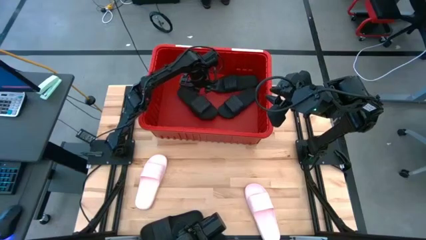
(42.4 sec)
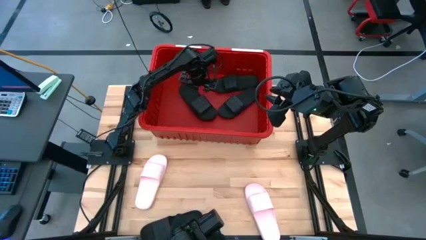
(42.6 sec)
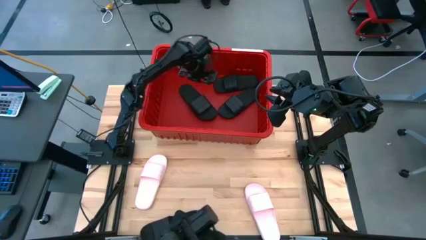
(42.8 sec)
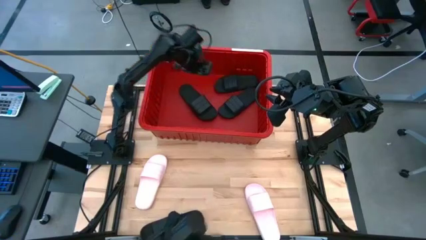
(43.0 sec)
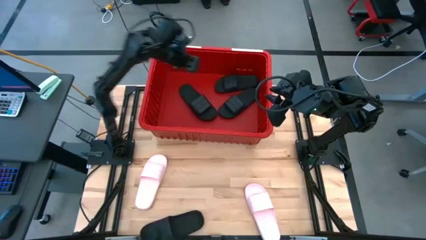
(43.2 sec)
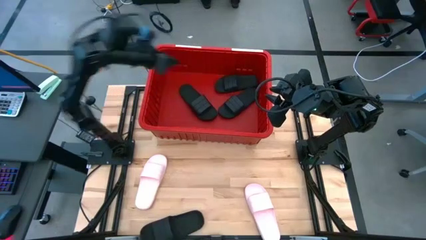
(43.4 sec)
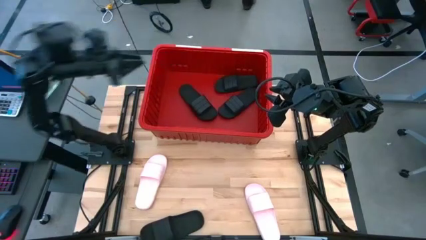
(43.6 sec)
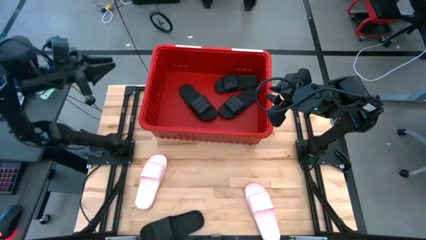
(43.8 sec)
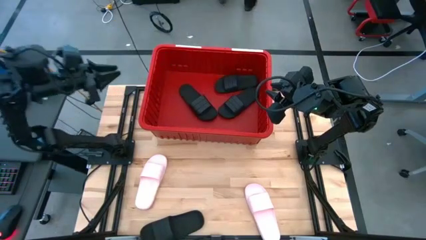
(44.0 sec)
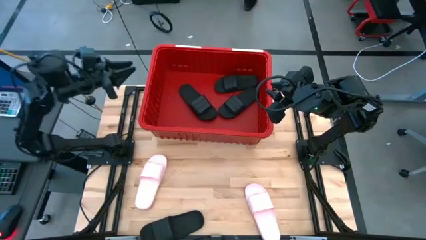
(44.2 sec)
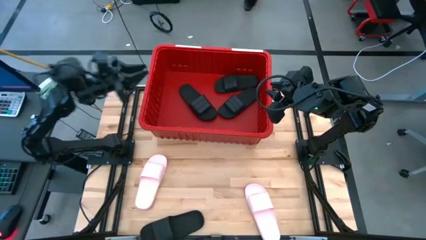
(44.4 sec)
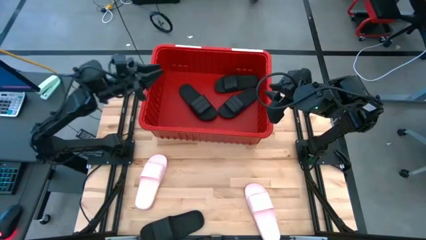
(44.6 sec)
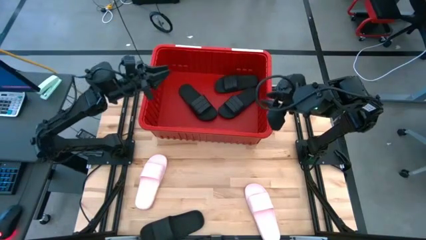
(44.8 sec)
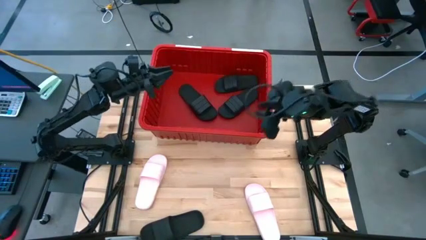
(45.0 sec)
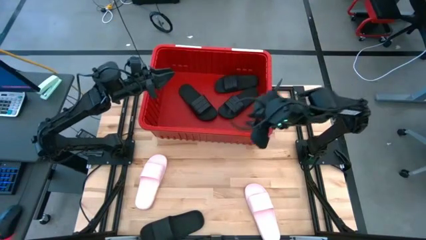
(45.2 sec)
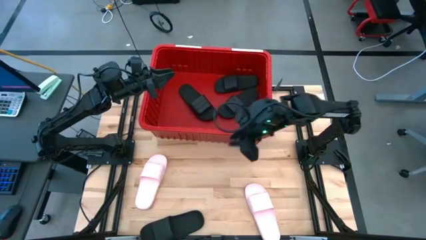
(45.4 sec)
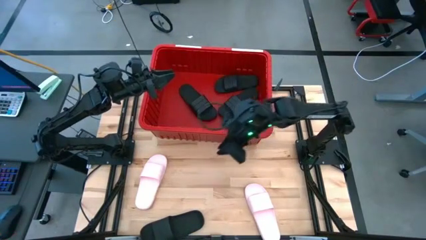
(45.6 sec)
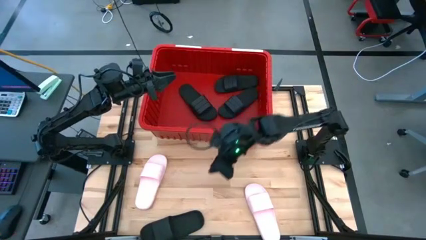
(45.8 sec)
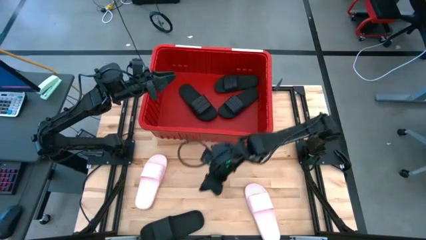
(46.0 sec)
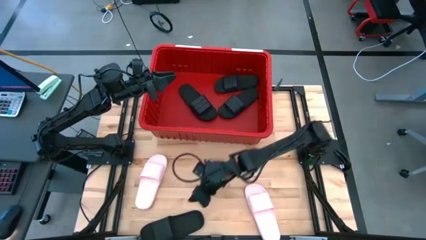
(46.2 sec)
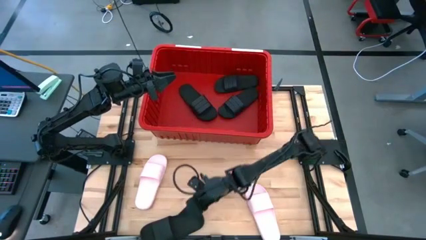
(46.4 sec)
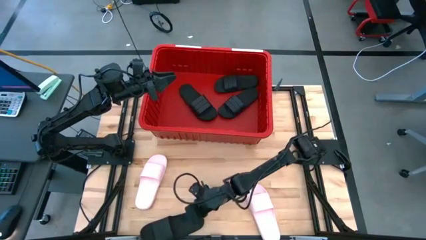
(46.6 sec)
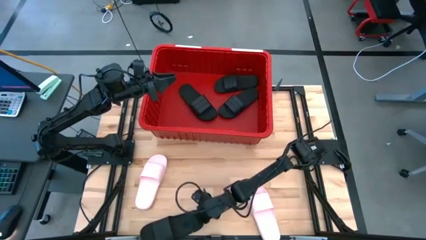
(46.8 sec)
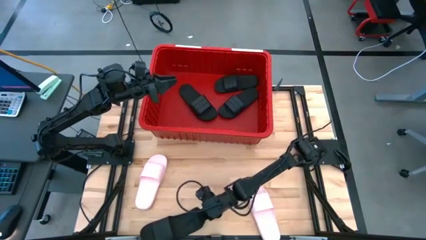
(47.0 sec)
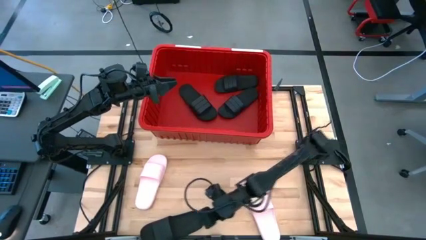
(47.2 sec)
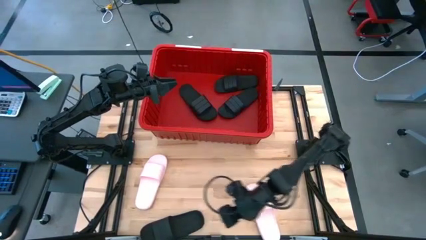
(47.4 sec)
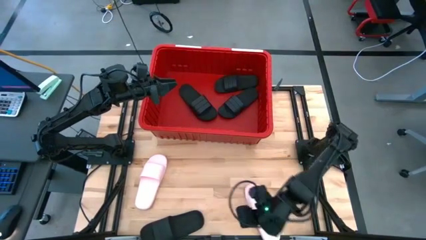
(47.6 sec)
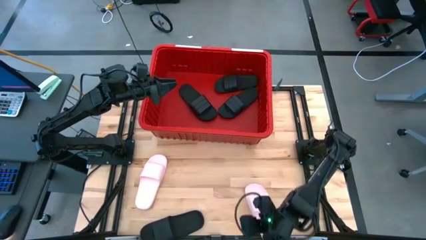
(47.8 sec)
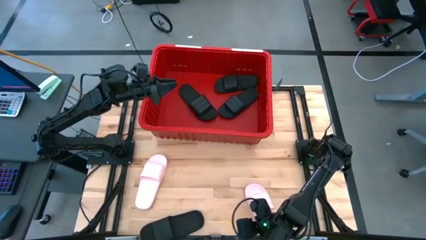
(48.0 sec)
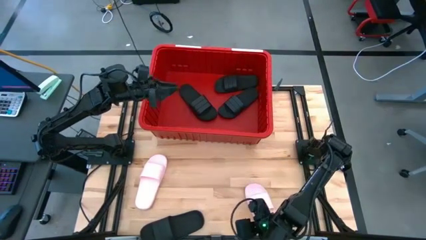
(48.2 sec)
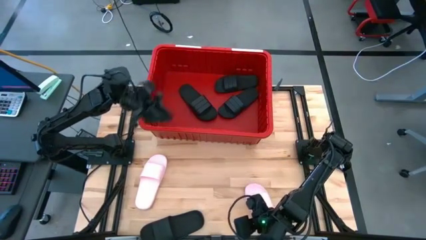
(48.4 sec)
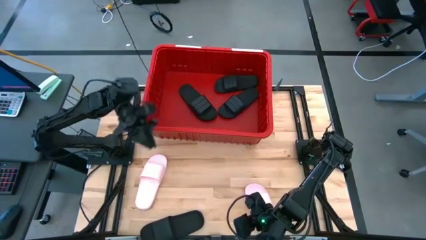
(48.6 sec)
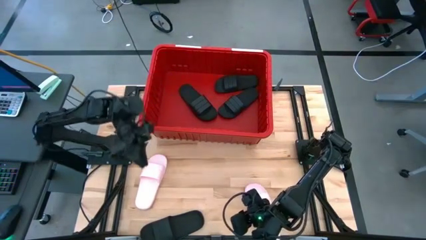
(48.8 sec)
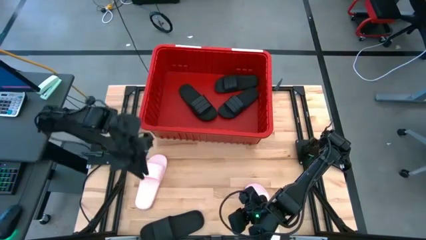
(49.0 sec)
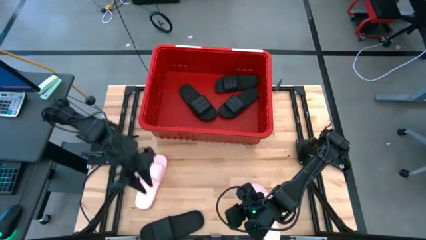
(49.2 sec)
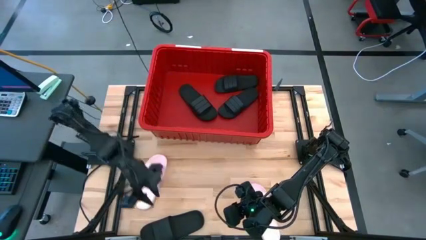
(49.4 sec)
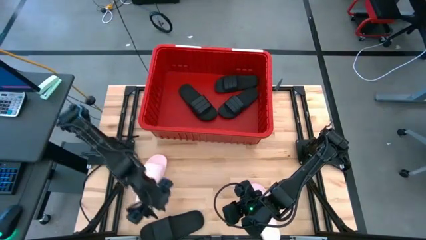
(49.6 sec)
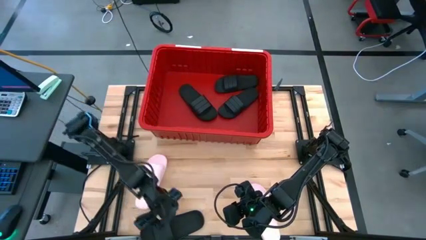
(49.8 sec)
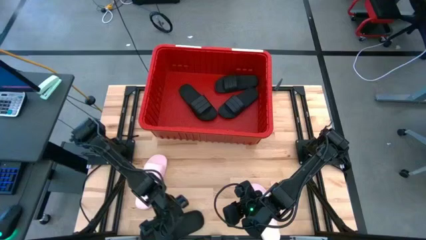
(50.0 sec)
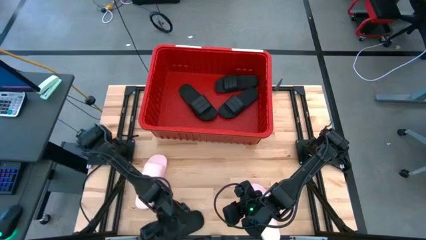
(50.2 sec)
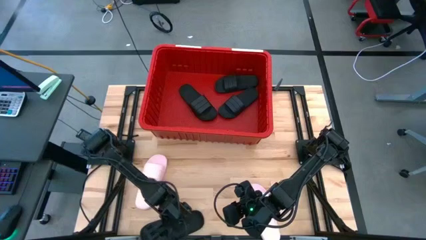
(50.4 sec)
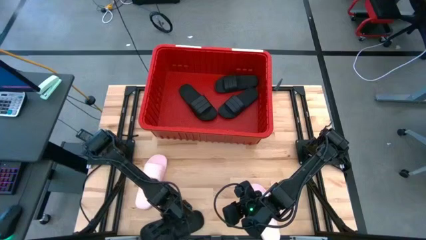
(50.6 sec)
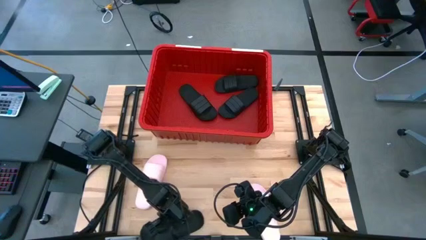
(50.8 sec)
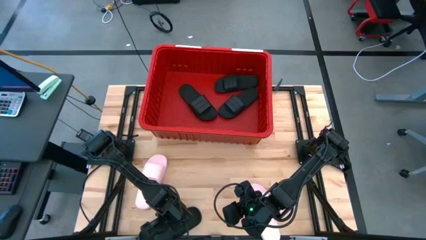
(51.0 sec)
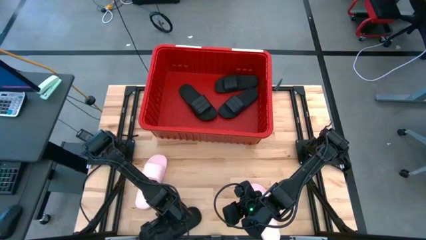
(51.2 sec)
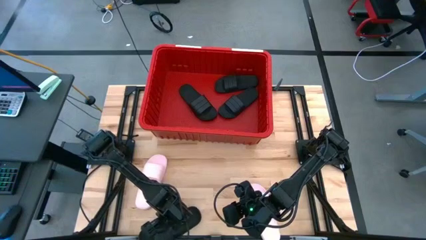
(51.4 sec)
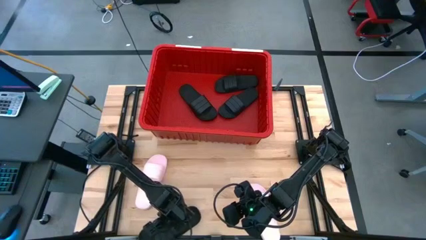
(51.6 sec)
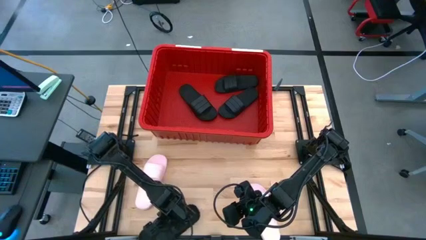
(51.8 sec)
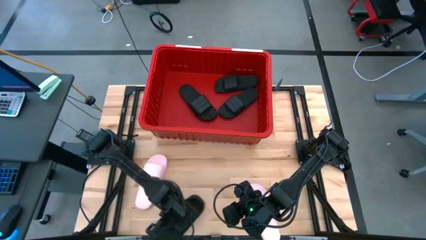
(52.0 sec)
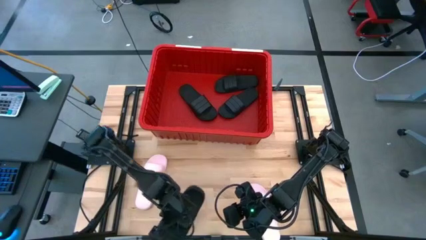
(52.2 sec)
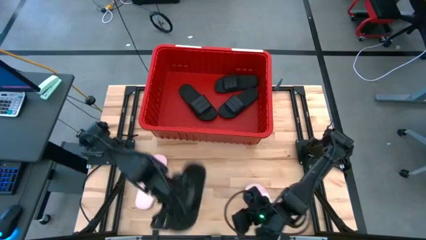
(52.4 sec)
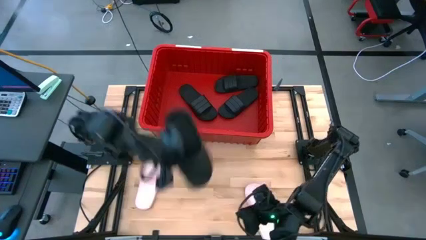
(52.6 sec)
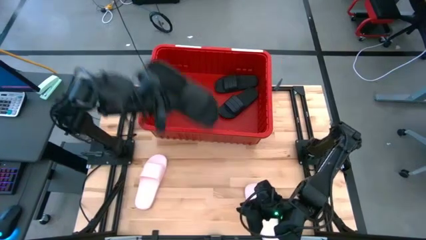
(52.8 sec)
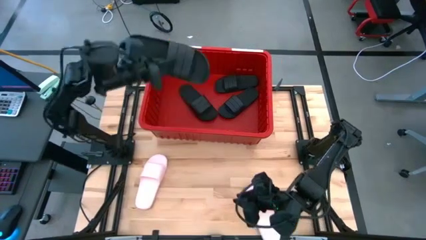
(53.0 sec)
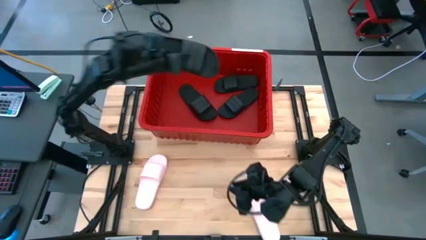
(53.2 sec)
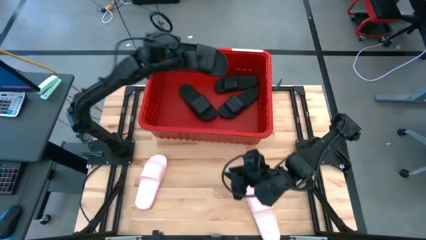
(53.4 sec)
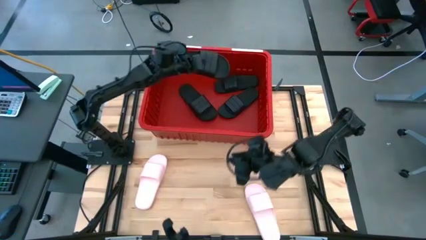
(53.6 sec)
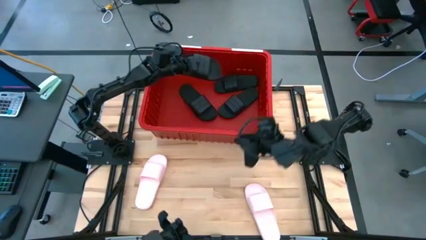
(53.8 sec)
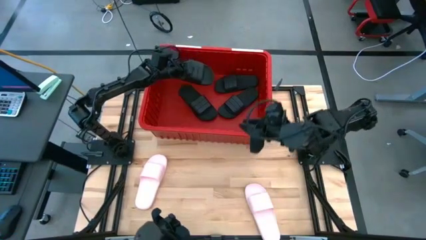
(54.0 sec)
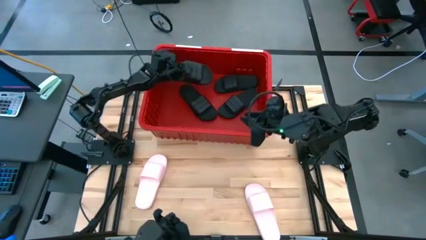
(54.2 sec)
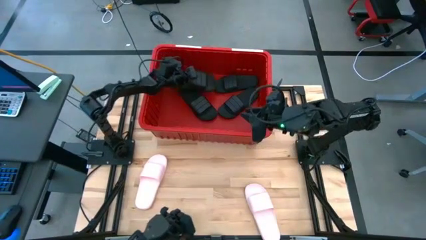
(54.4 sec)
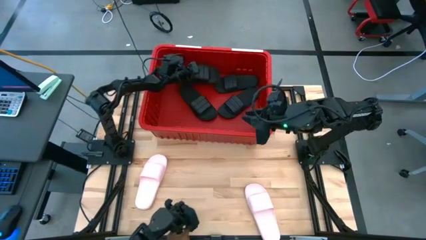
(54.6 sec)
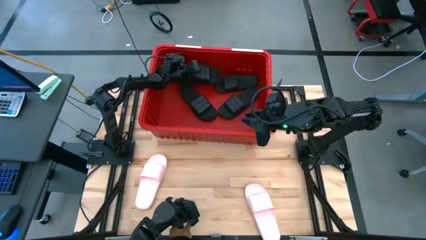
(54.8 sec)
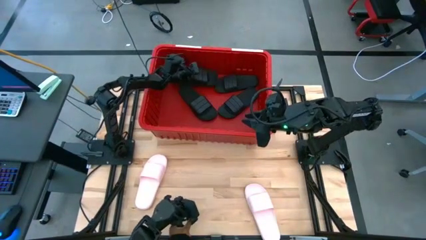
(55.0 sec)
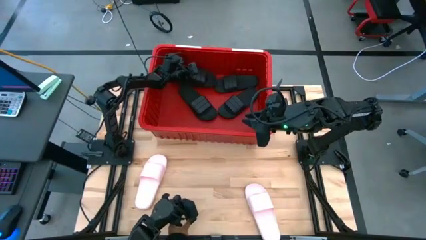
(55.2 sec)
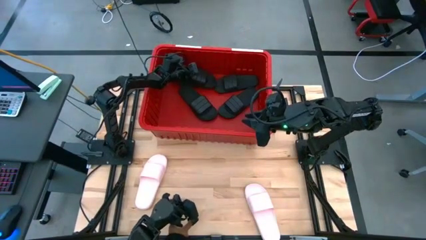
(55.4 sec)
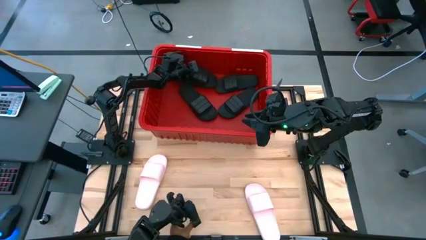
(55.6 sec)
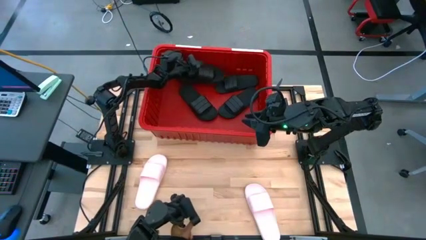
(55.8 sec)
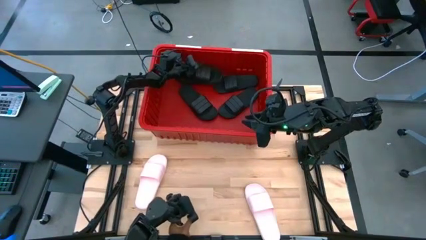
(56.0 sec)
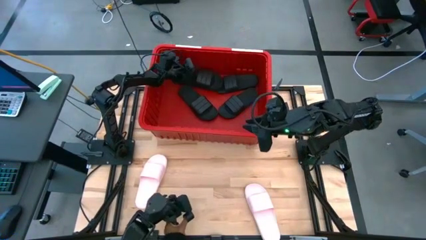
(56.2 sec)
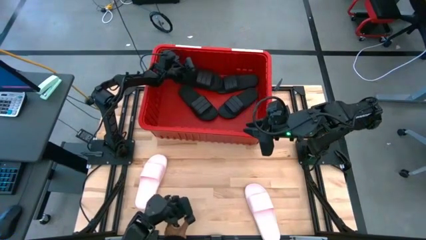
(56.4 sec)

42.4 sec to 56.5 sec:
Task: Pick and place slides into bin
Put the black slide into the red bin

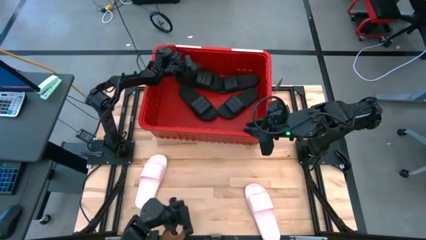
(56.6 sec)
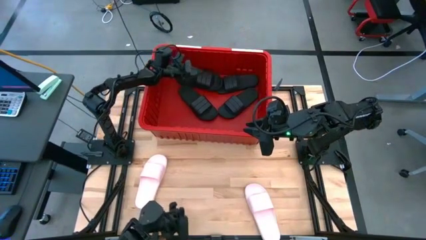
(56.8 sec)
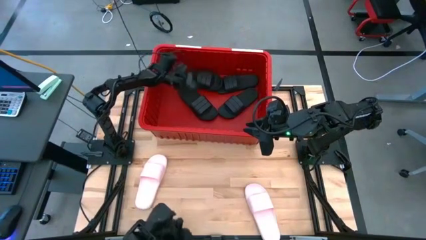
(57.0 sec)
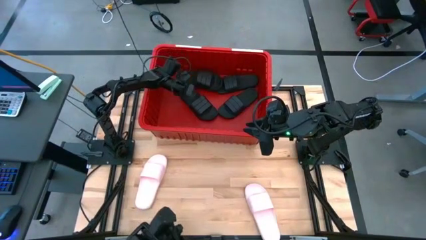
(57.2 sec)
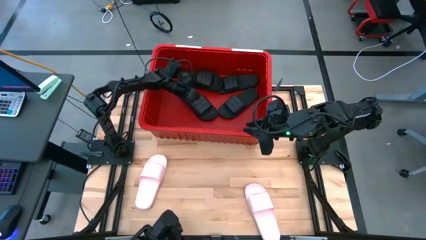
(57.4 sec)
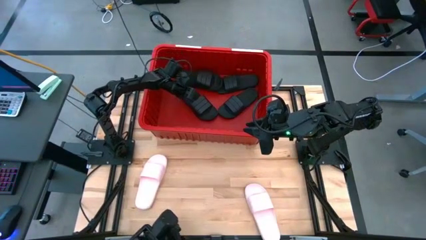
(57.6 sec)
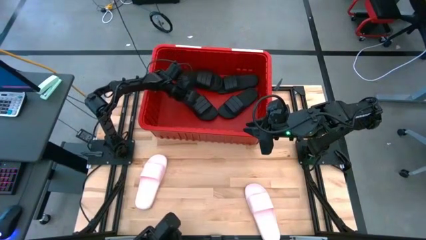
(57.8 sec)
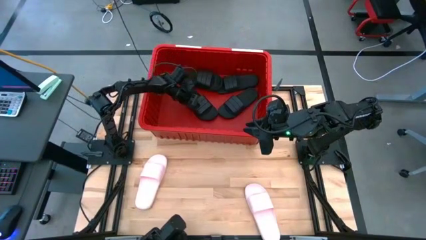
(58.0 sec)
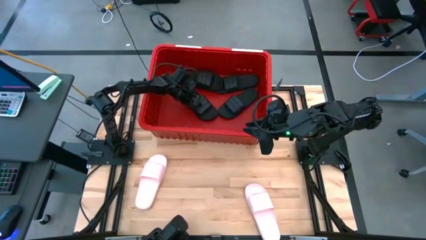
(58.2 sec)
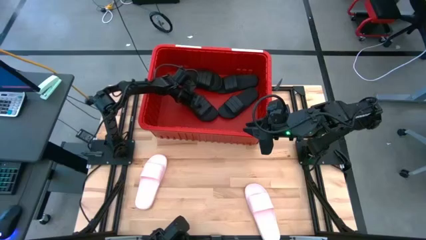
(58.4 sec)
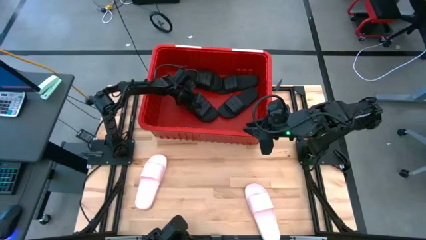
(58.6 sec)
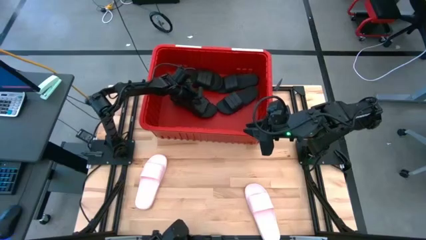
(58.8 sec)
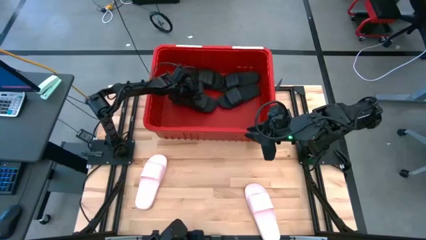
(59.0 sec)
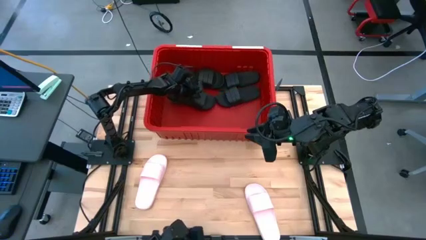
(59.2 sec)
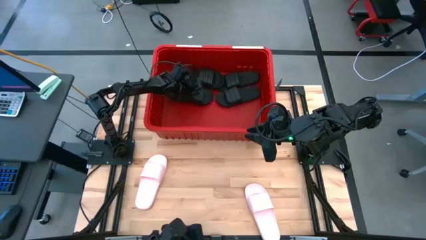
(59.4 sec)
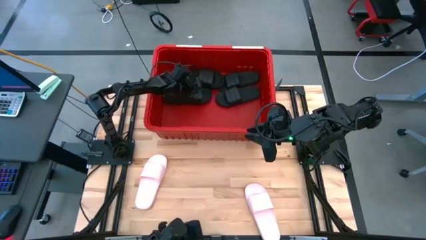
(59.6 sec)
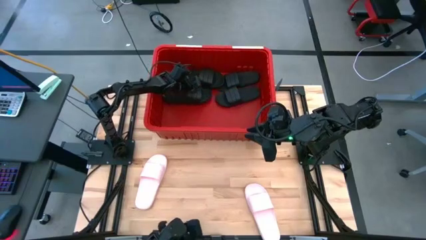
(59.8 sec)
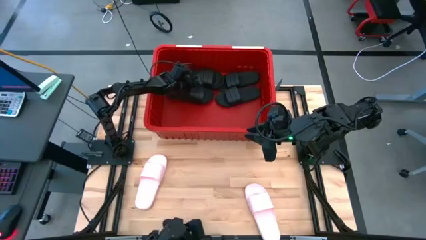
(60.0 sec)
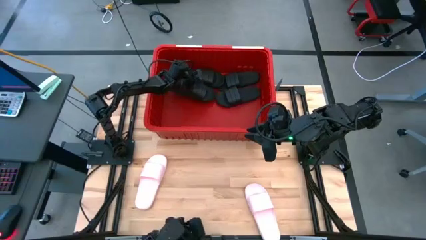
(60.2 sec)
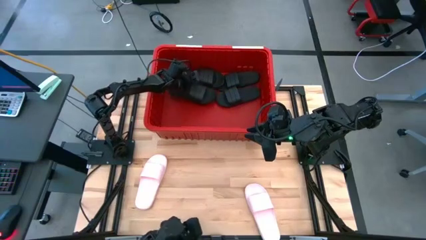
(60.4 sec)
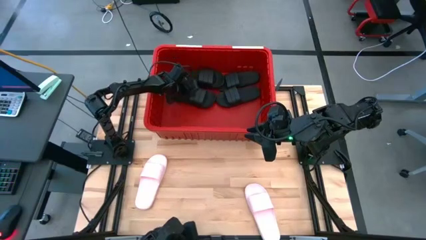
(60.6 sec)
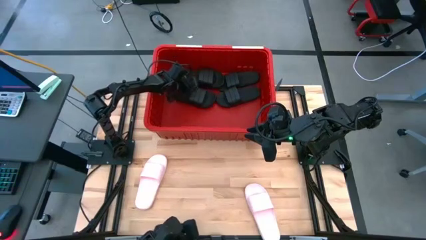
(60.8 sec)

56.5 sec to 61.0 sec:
Adjust the black slide in the red bin
